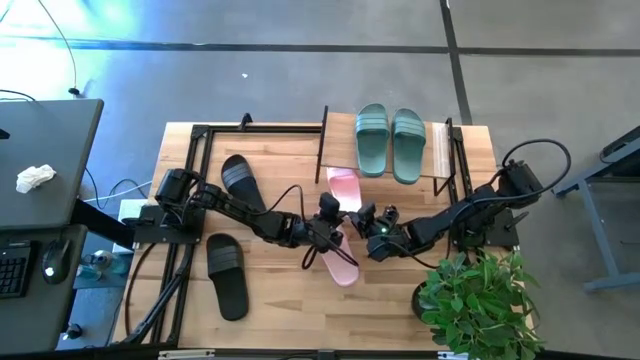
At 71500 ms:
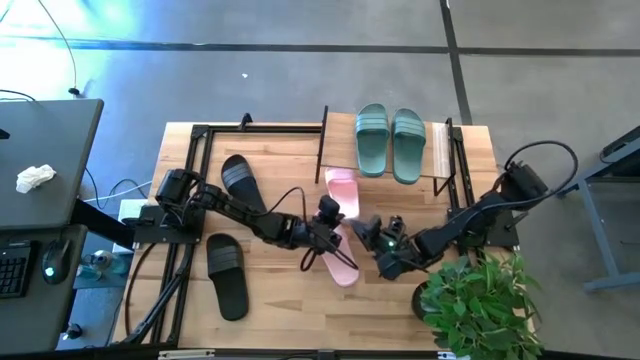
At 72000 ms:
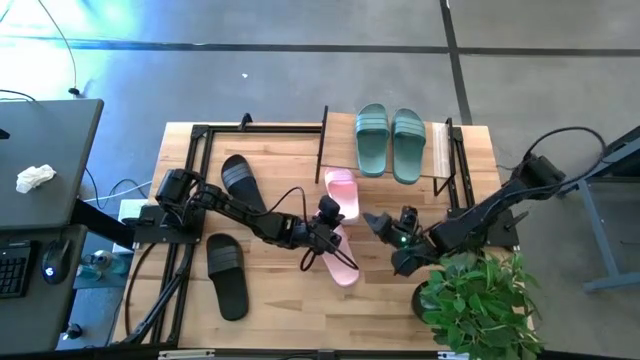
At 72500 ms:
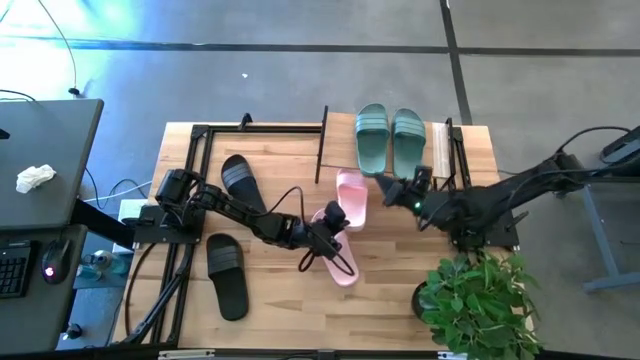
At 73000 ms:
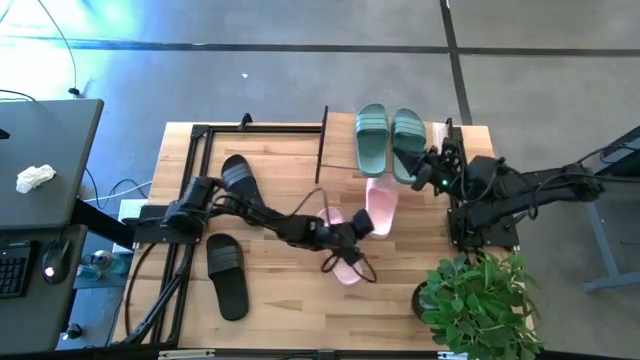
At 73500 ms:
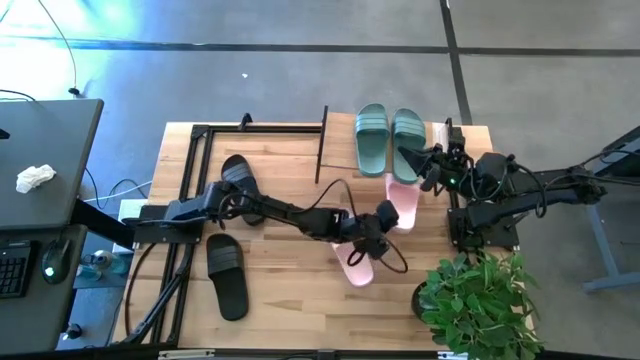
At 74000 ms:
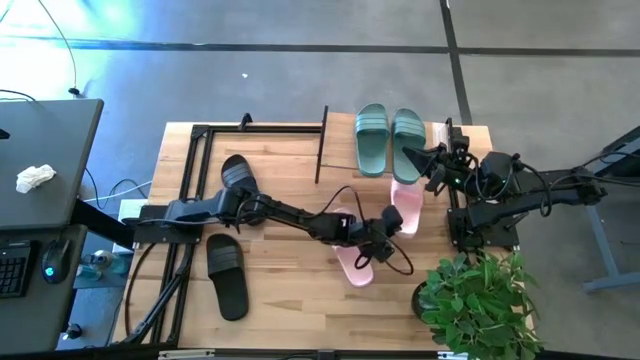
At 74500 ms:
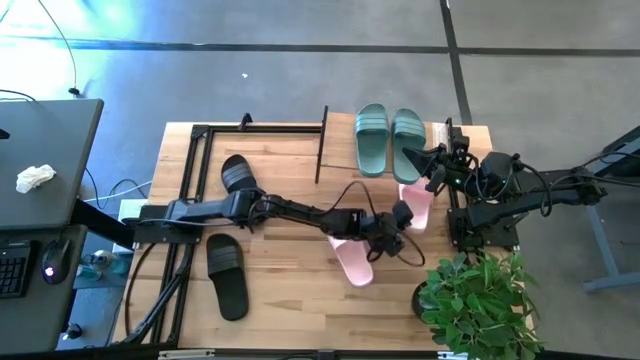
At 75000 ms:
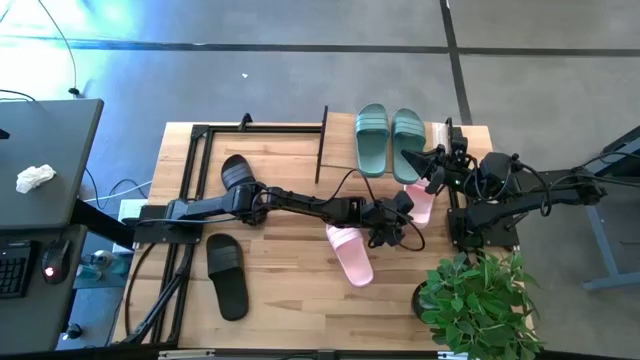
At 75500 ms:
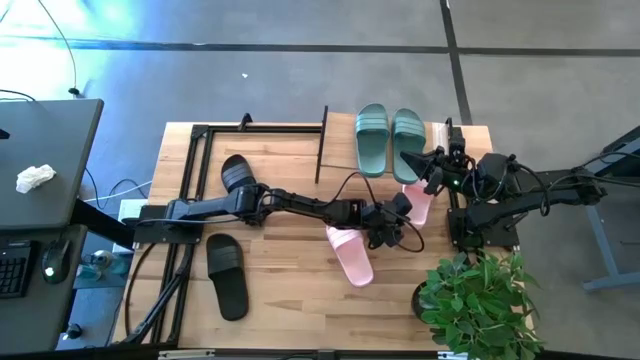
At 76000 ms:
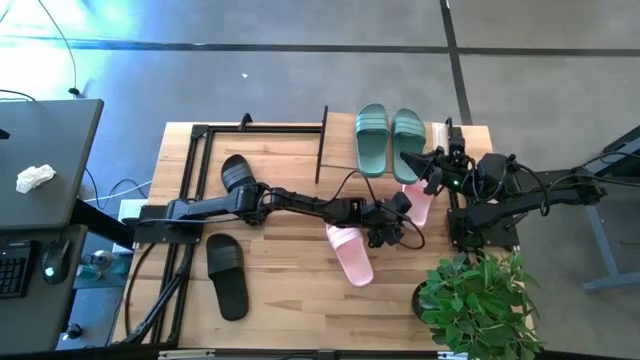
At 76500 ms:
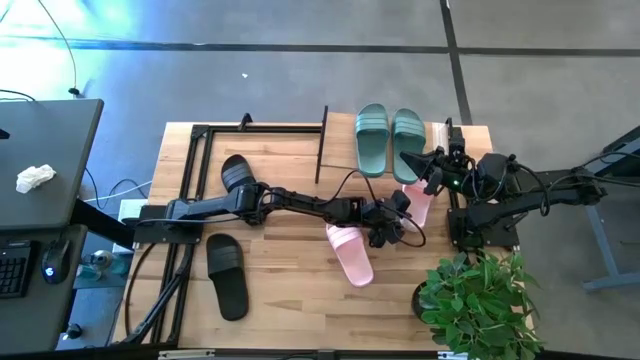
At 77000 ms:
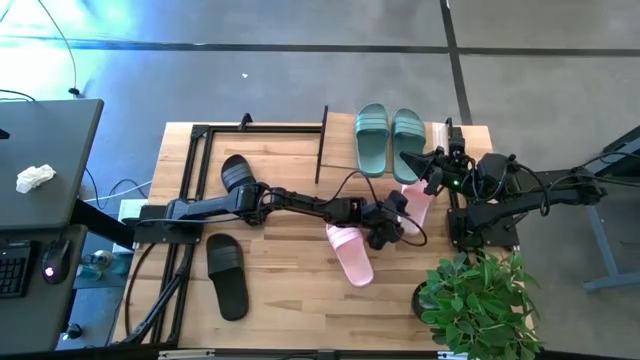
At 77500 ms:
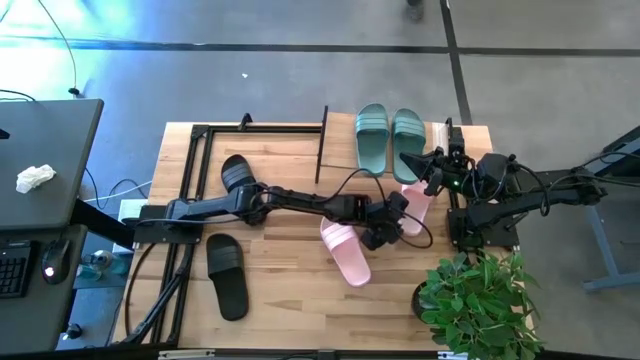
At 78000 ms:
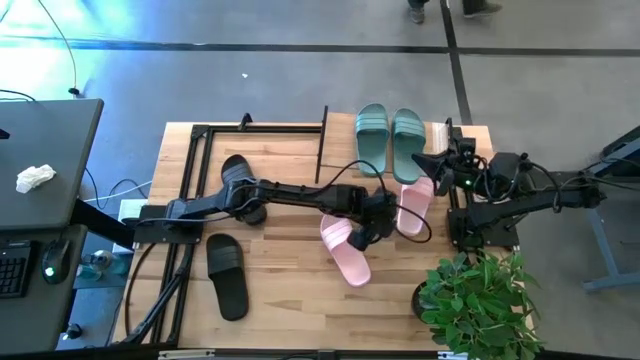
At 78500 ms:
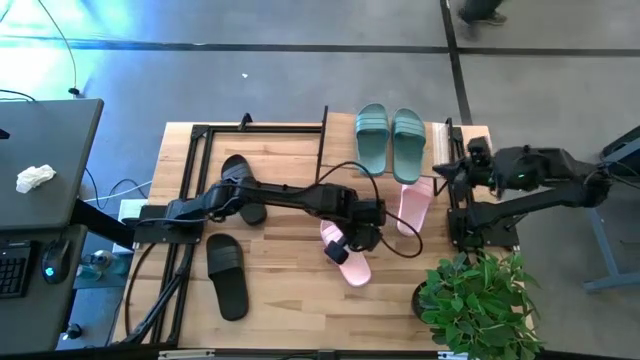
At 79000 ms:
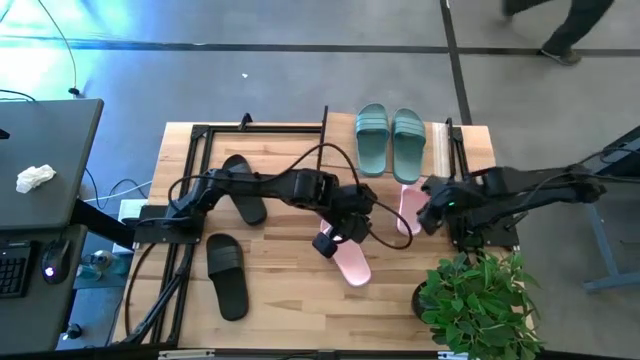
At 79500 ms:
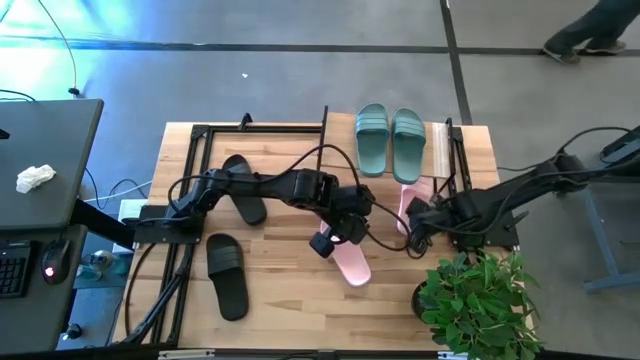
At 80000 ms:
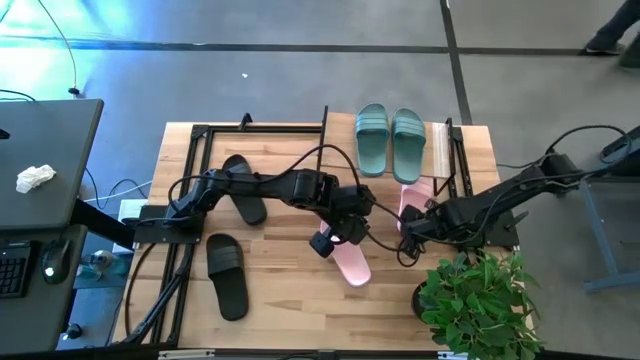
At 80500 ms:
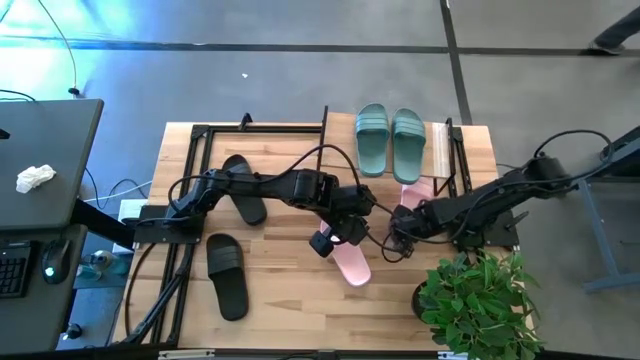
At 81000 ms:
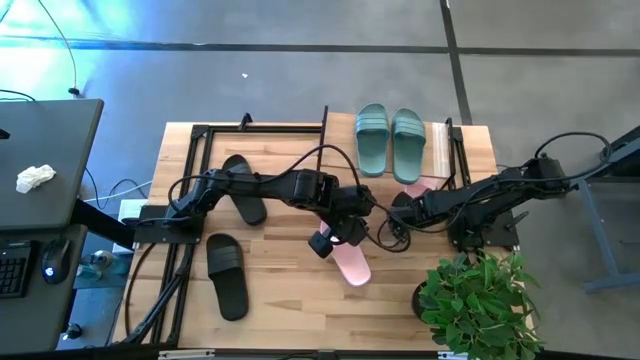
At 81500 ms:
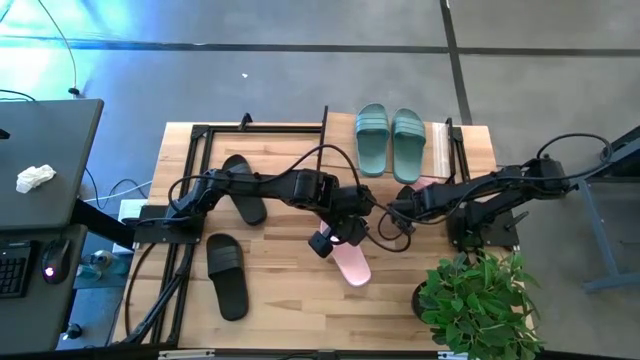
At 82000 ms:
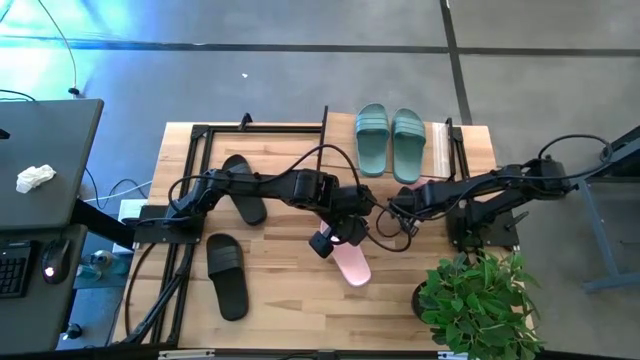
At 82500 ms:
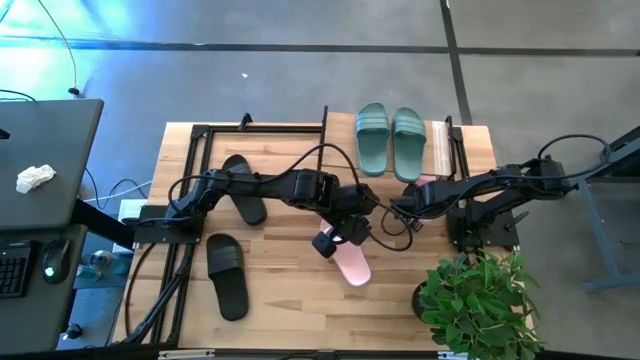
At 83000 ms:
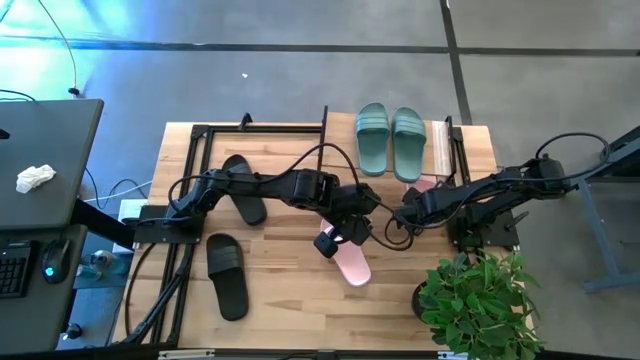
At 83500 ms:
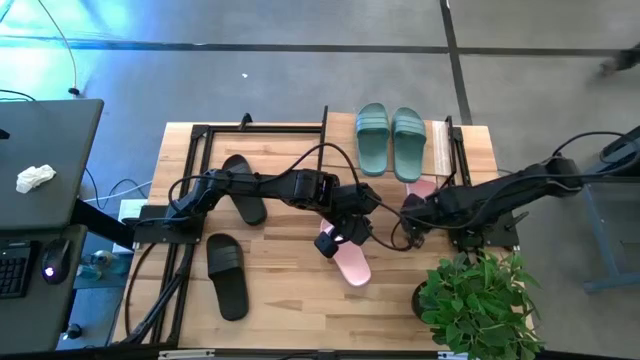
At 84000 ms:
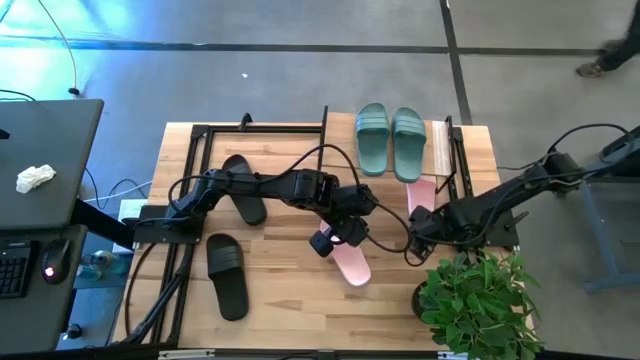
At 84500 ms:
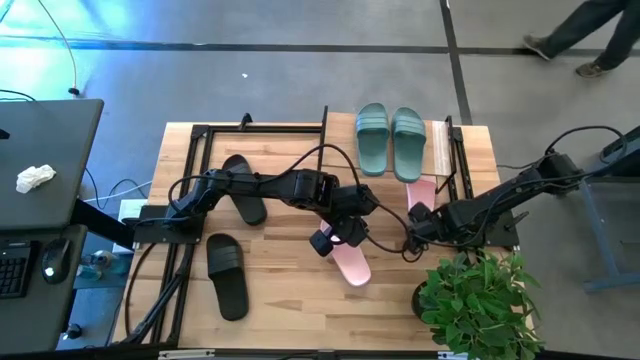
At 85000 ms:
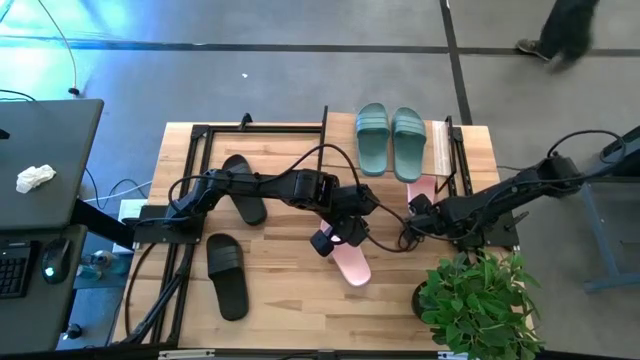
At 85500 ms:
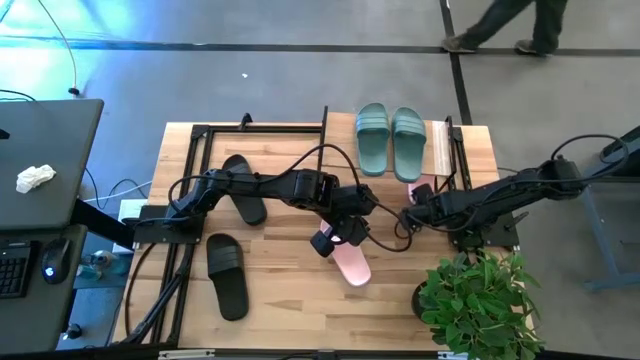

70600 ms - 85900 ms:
Task: Pick and place slides into the shelf
Put the left pink slides under the shelf

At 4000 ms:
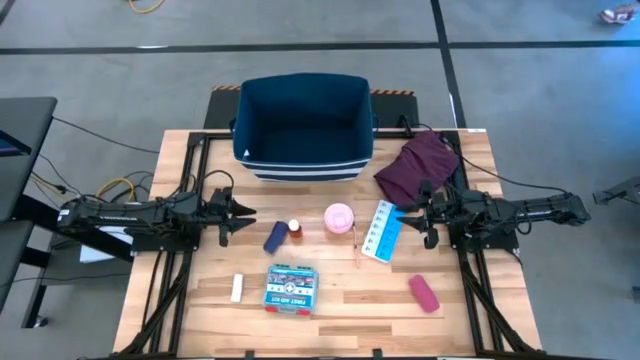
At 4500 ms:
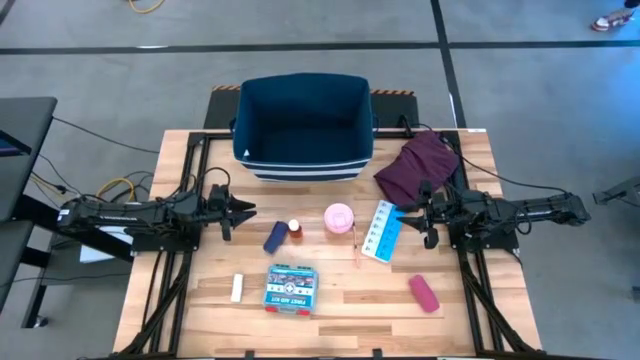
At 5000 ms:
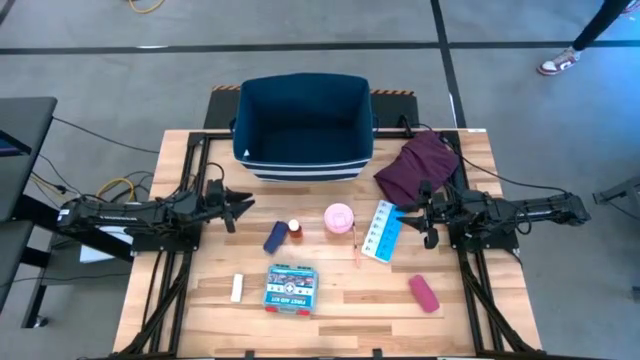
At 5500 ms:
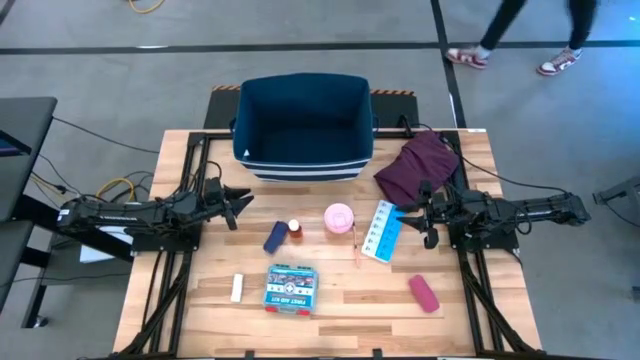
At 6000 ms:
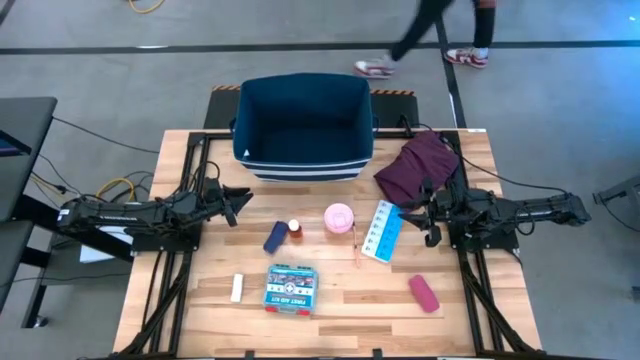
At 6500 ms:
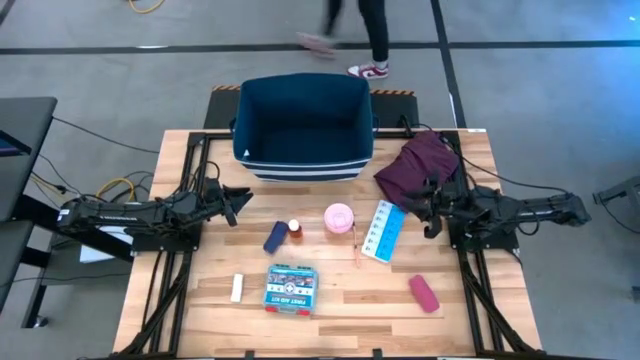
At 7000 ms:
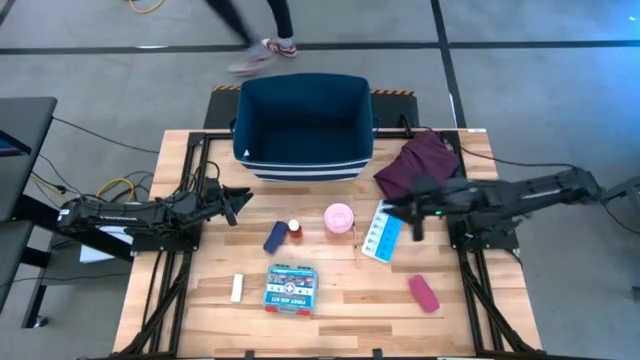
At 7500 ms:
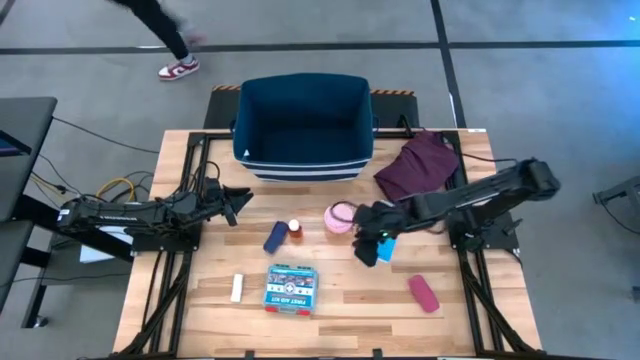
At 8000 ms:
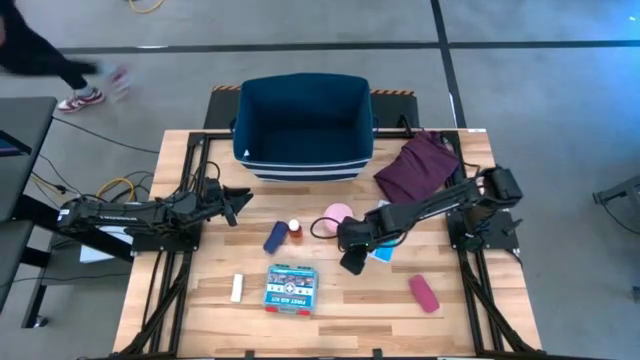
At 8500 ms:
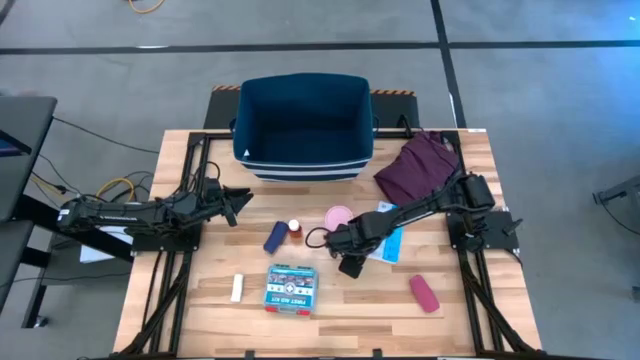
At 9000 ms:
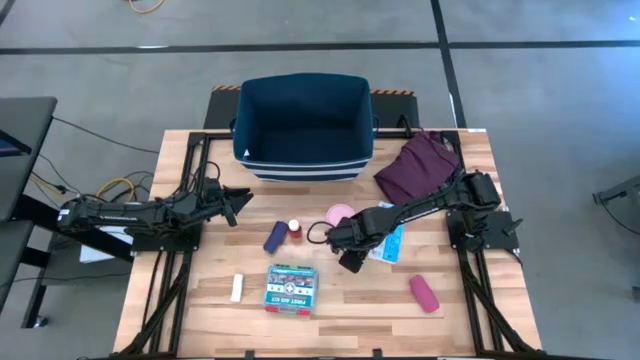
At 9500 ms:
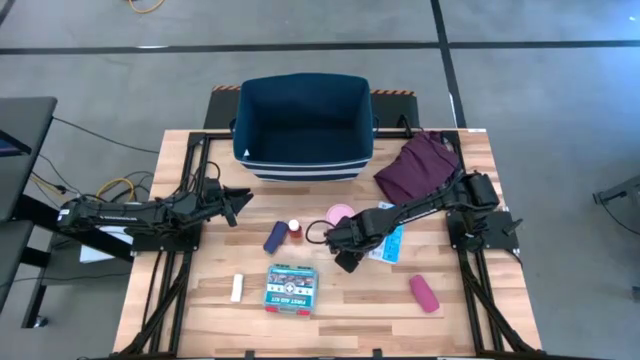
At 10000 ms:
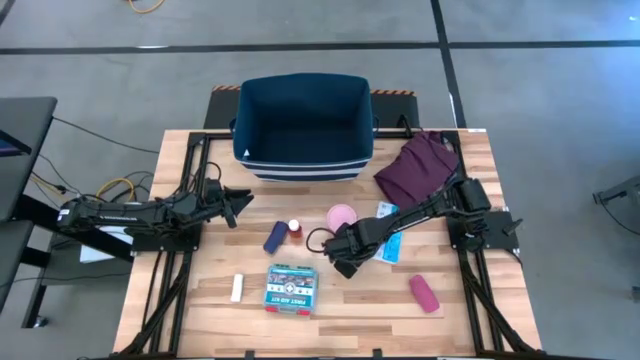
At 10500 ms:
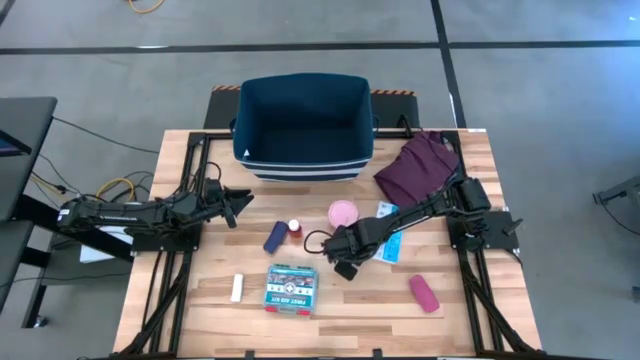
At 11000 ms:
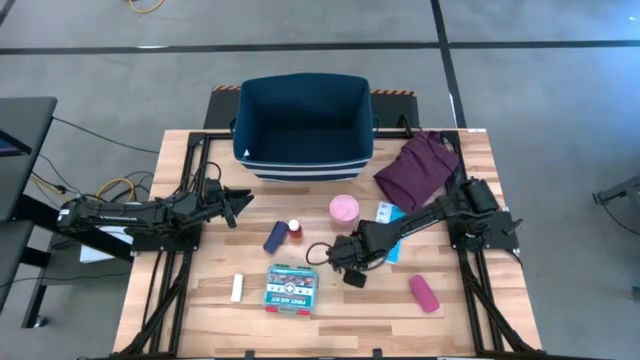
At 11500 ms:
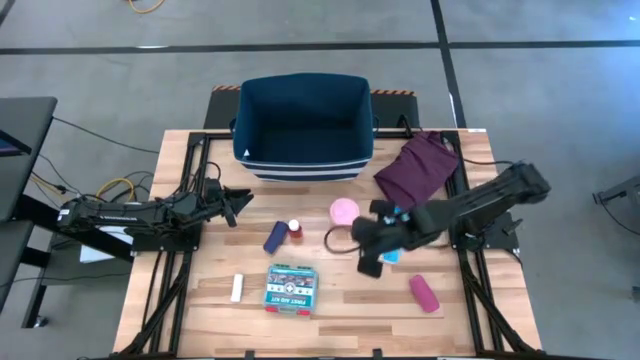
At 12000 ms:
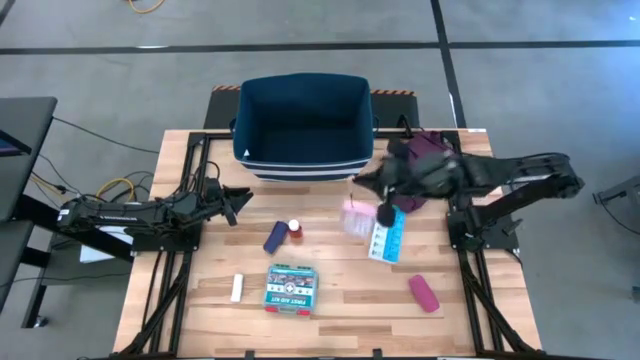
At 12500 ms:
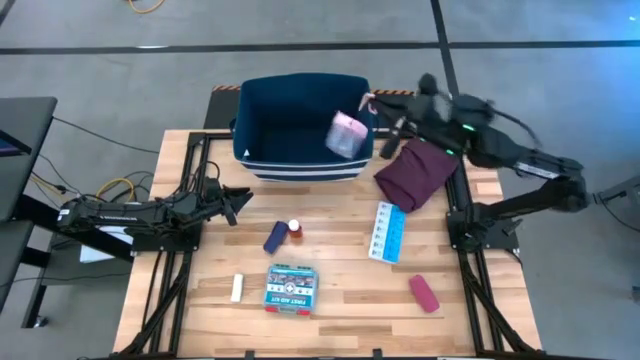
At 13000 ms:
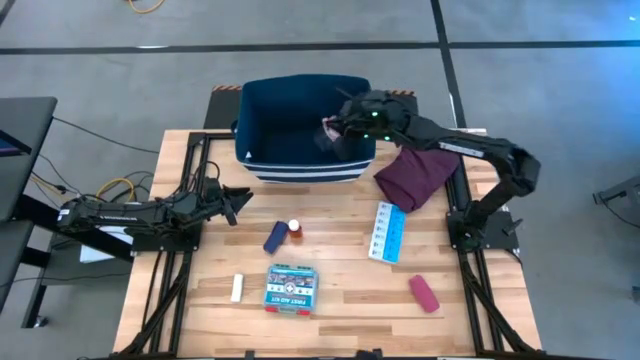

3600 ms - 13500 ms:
Task: Pick & place medical supplies in basket/bin
Put the pink tumbler into the blue bin
